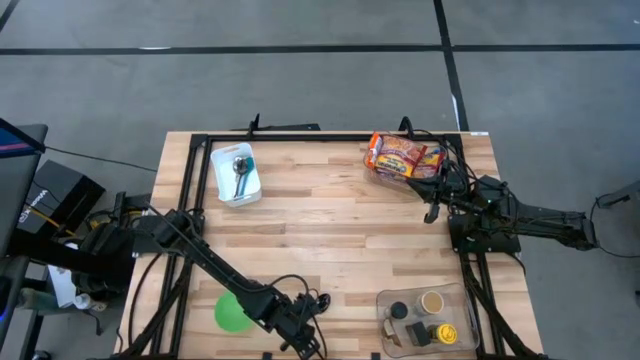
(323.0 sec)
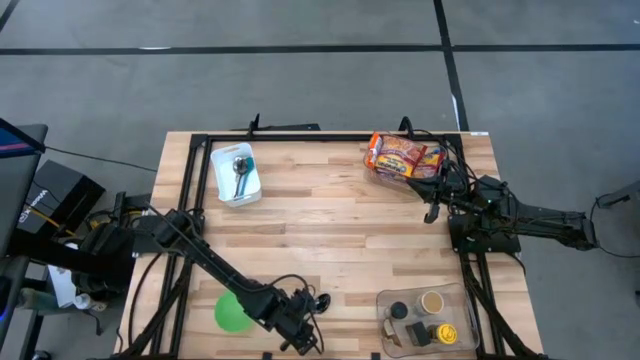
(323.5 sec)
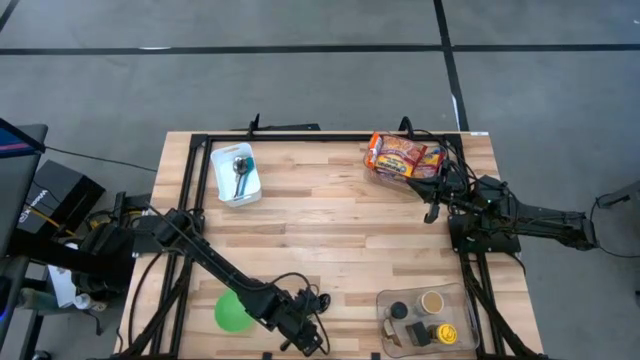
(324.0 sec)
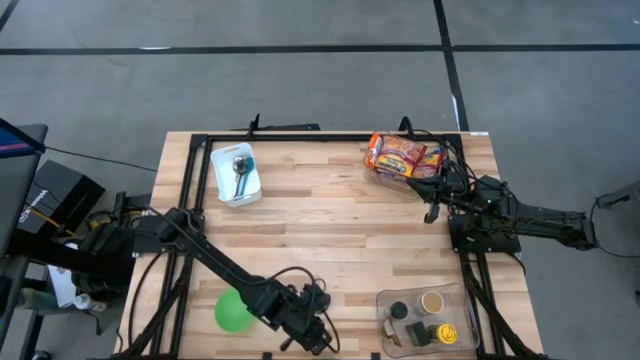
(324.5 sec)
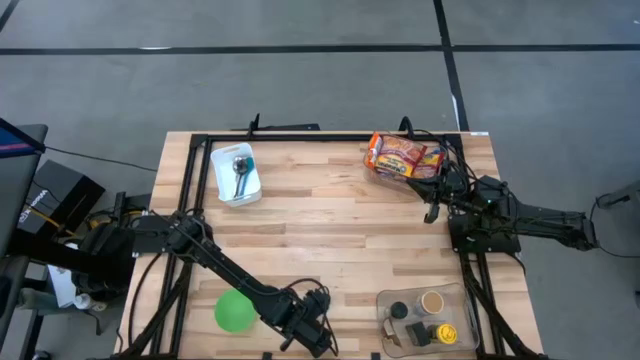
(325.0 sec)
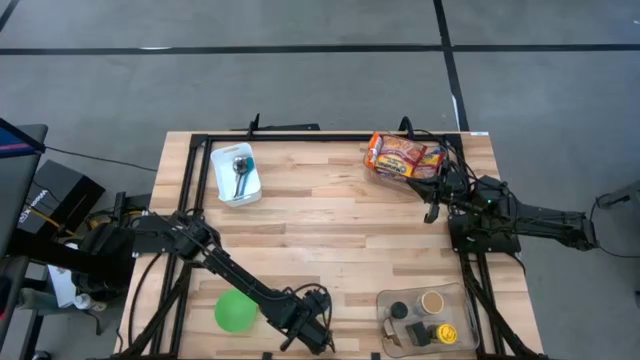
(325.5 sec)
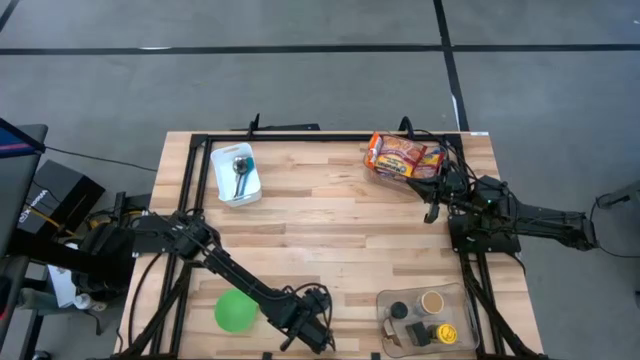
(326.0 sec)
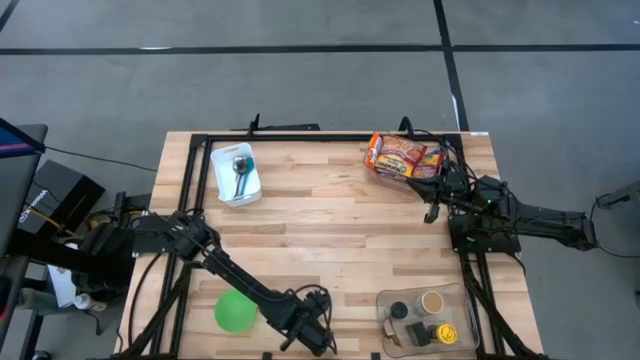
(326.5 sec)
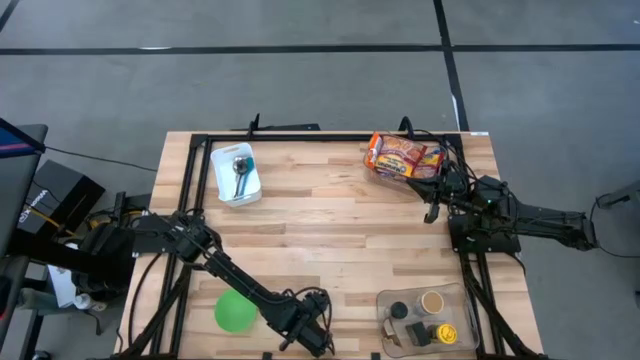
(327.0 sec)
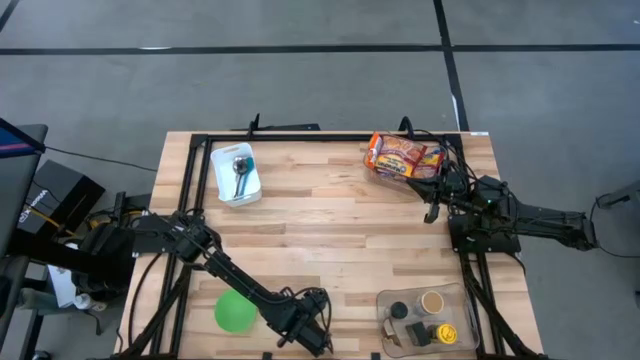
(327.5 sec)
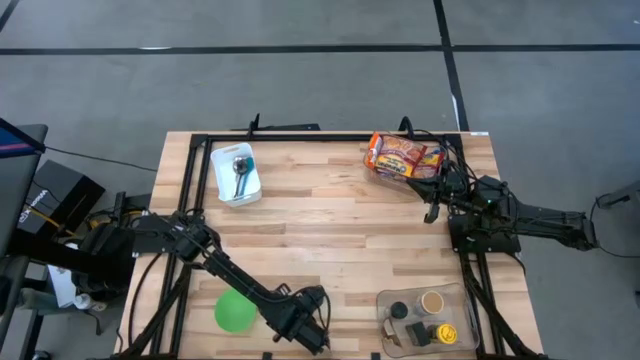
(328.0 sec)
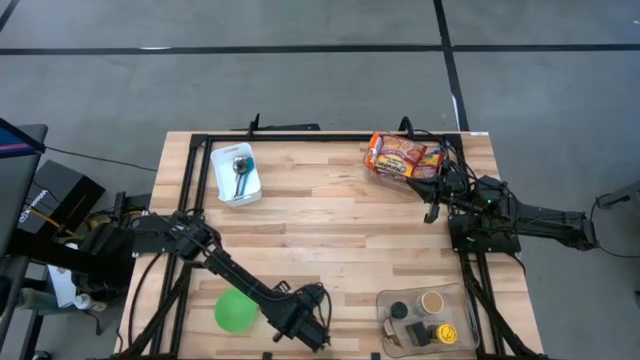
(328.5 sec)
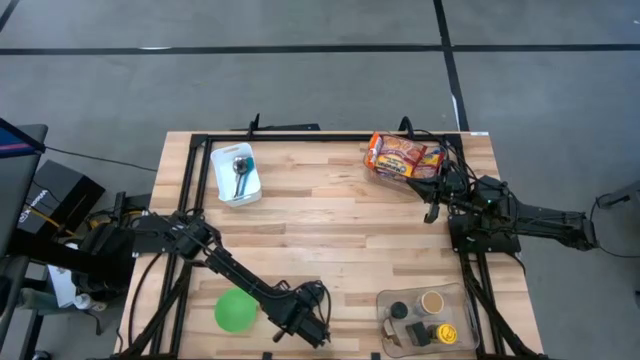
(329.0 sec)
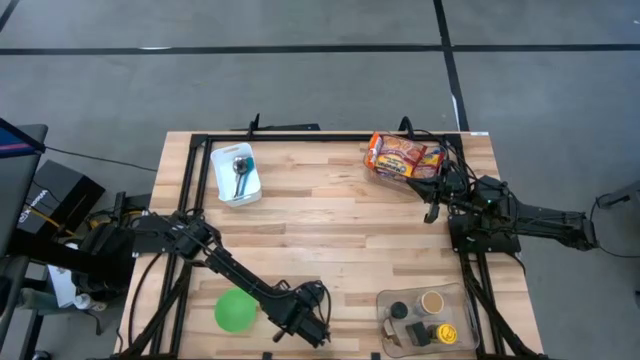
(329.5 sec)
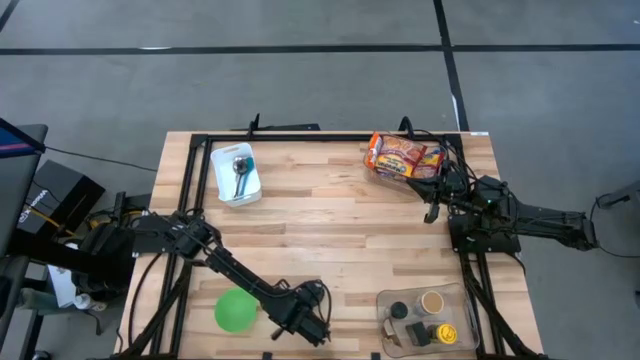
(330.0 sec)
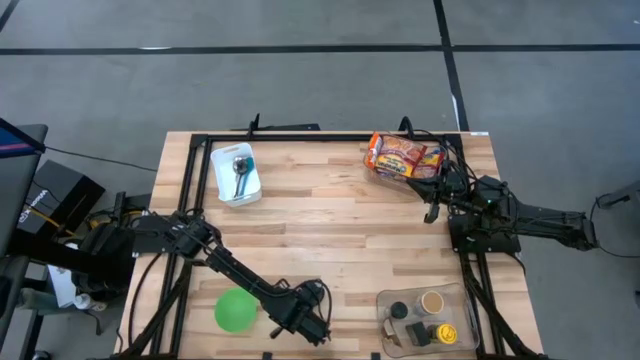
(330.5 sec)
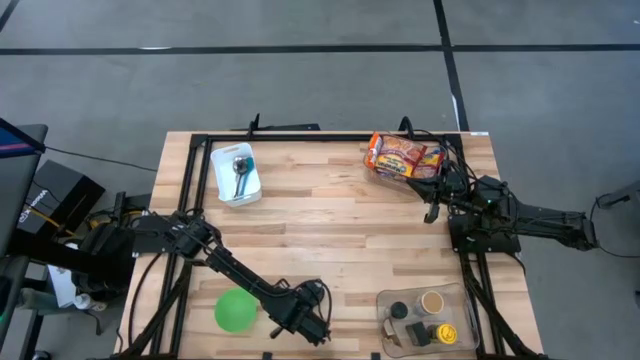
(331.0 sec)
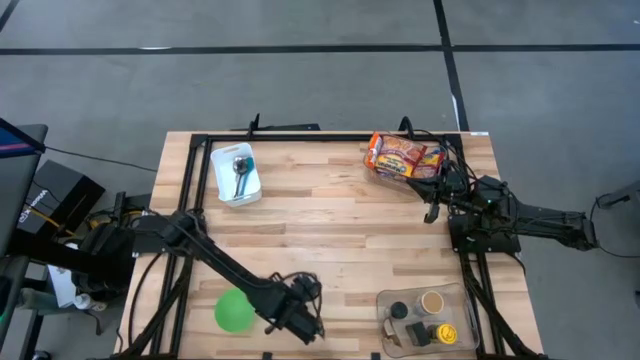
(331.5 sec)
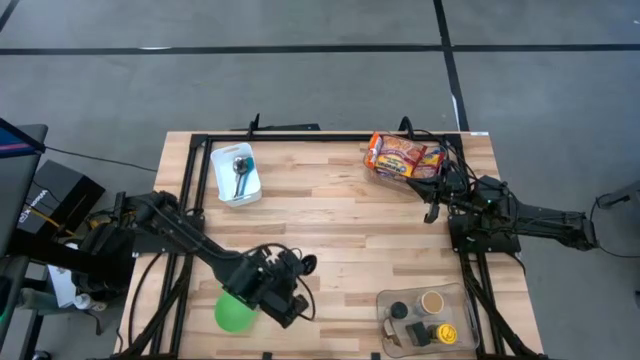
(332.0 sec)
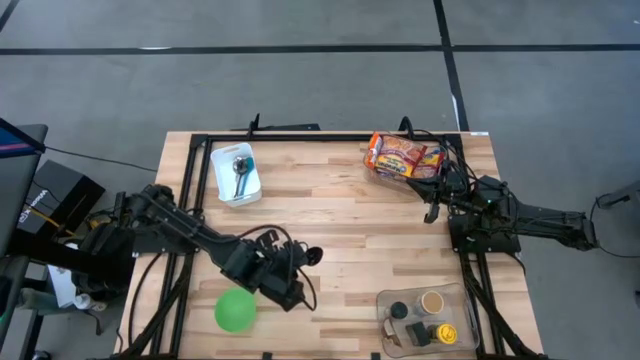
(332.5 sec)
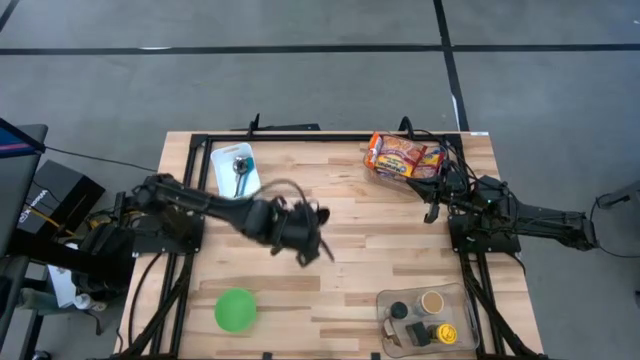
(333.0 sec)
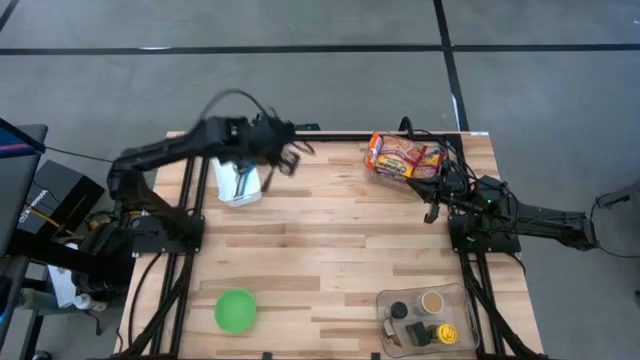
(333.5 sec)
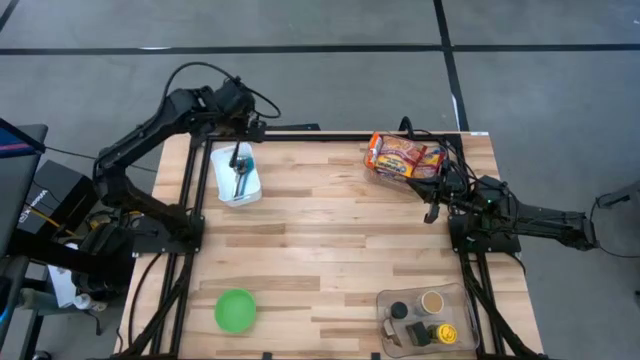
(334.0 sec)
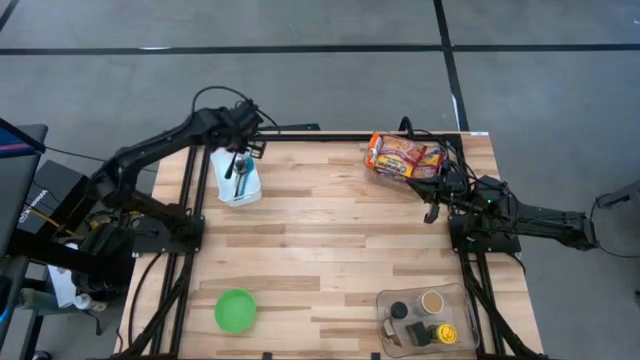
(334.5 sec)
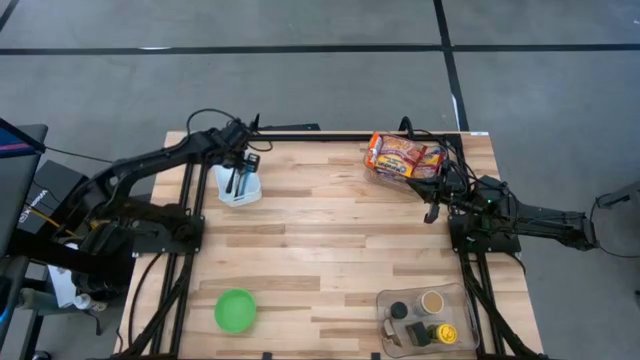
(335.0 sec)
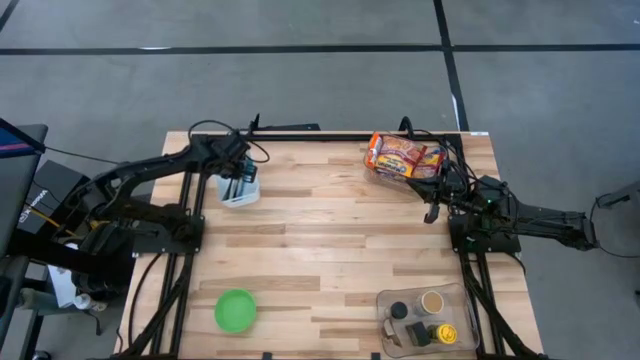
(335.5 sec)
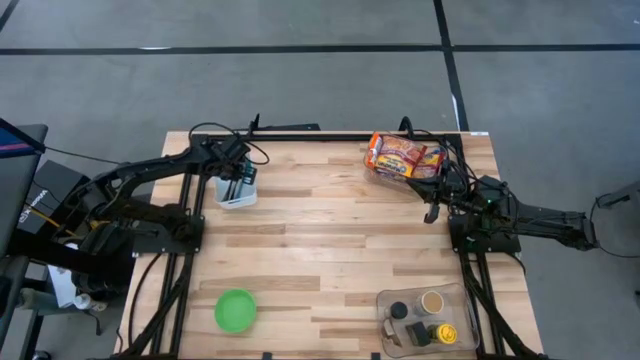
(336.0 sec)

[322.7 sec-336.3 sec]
Task: Pick & Place Food Item
Put the black spoon into the white bin

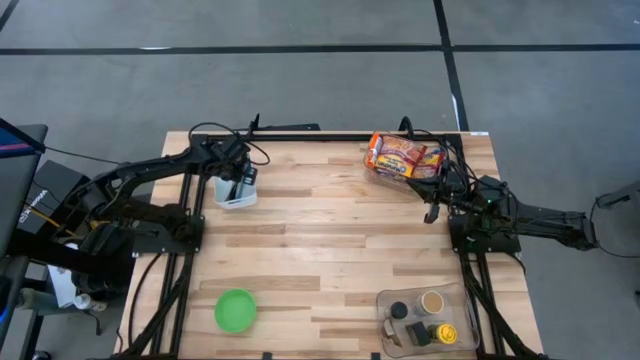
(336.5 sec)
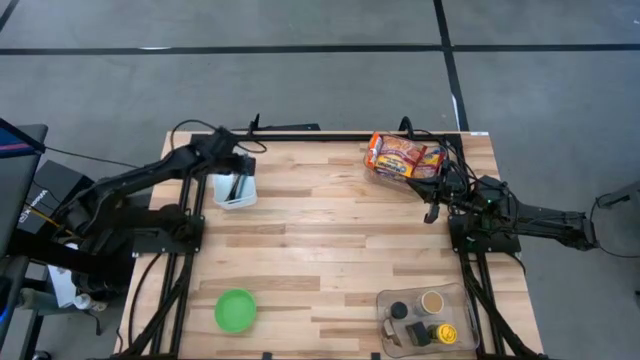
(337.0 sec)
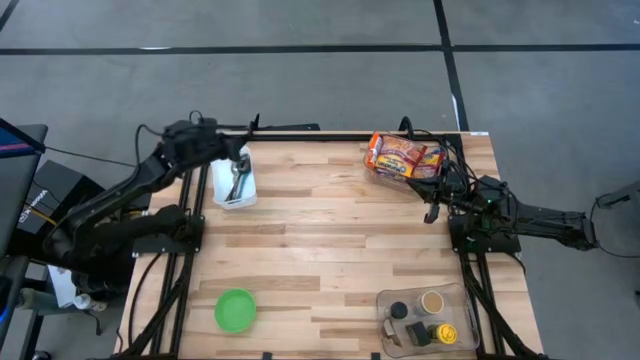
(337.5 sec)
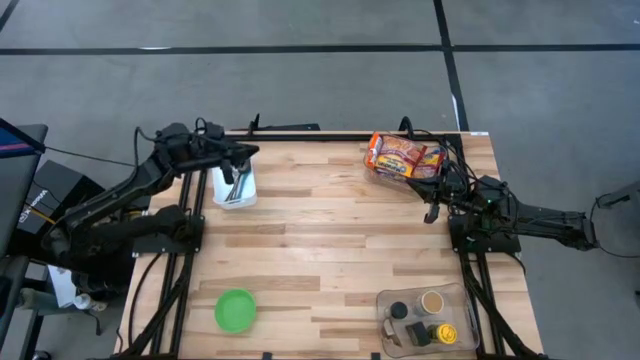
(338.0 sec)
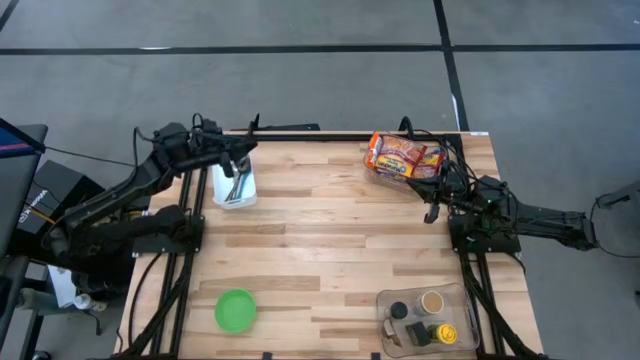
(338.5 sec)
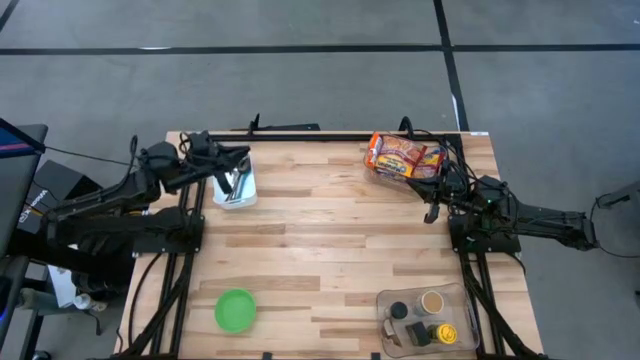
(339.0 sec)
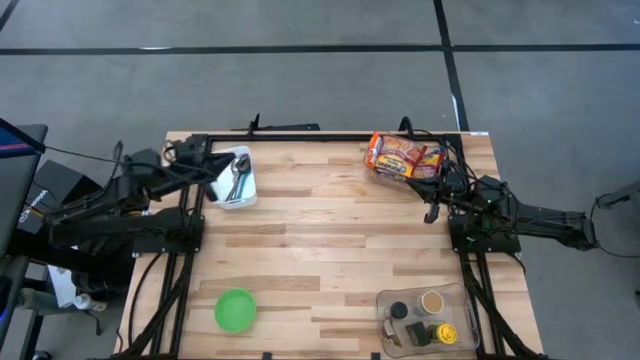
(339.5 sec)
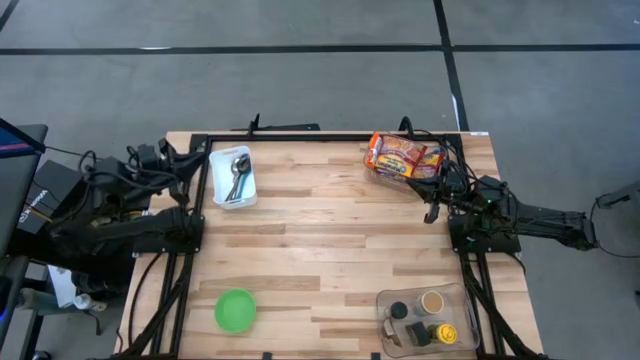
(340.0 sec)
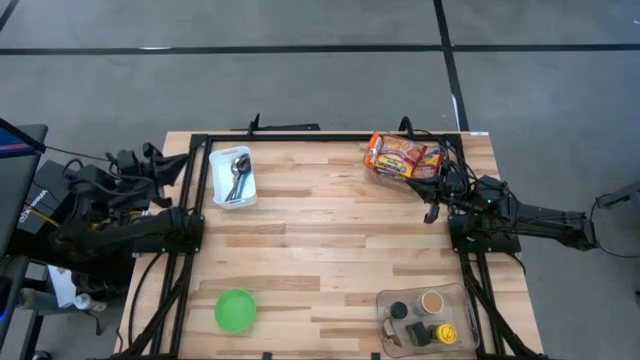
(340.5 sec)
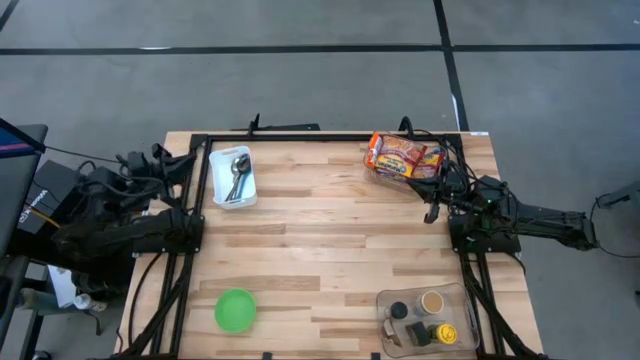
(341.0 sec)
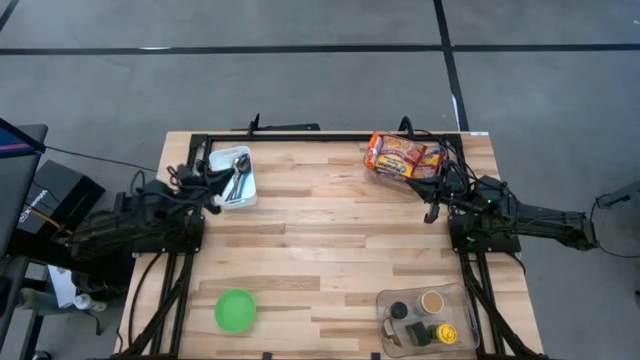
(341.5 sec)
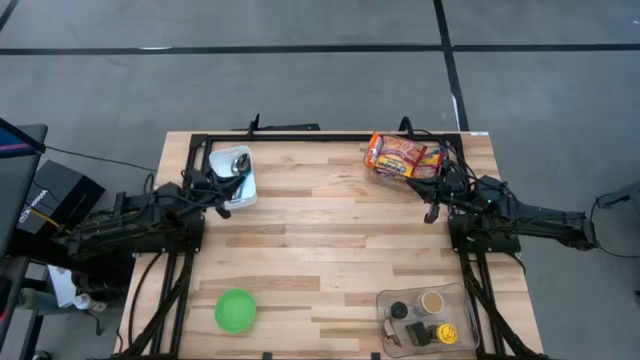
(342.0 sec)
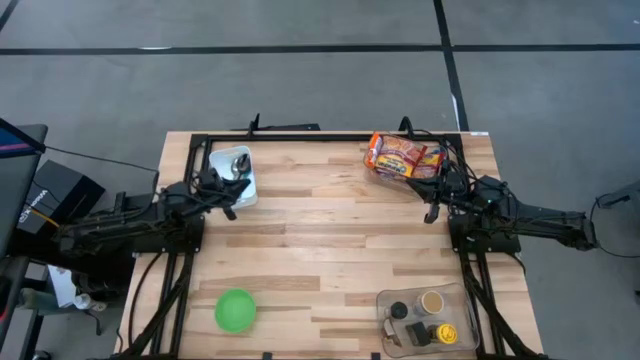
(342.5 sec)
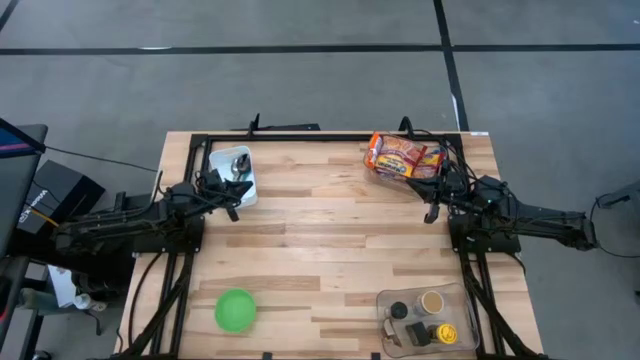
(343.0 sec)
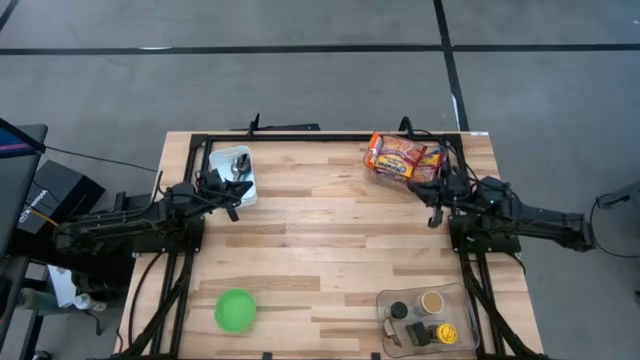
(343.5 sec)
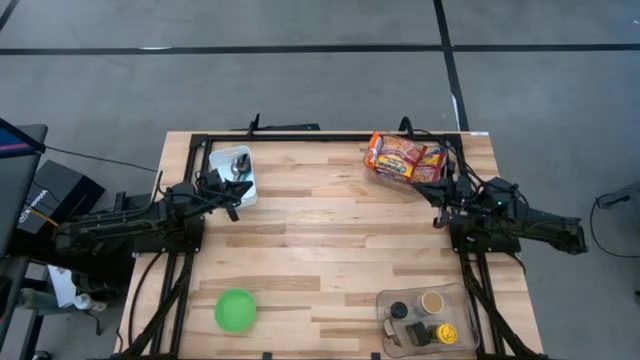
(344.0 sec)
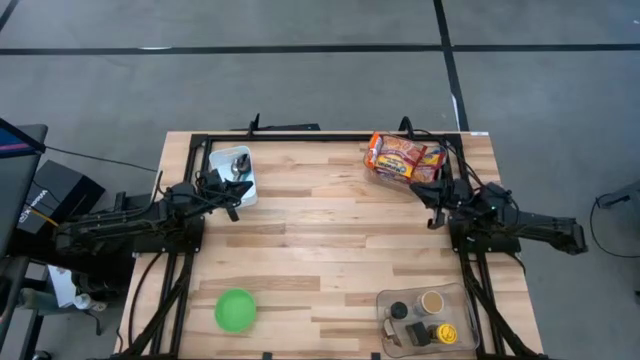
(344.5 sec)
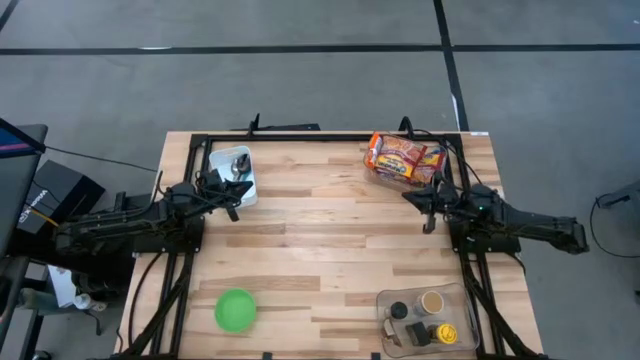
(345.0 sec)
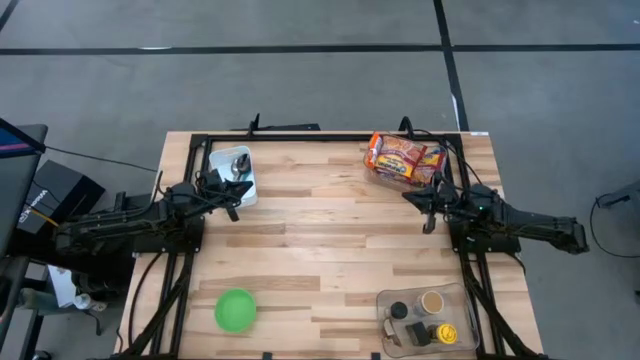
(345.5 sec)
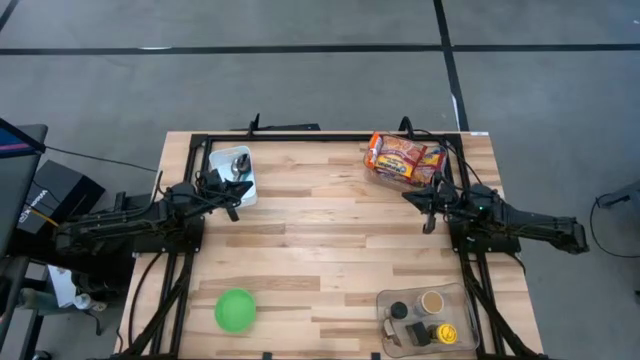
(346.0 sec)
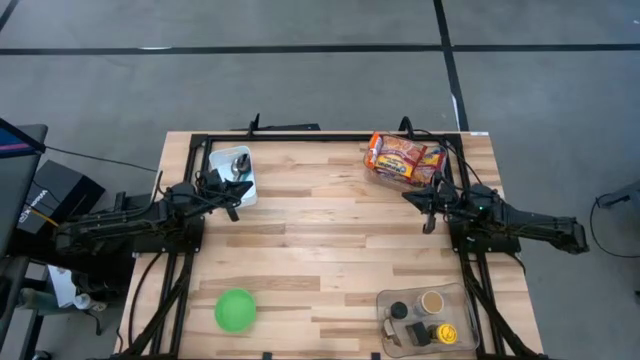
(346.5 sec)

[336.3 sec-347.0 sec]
Return to Home Position
